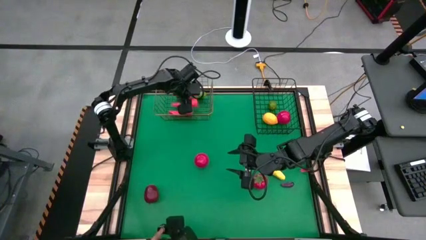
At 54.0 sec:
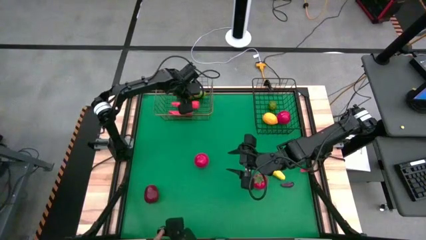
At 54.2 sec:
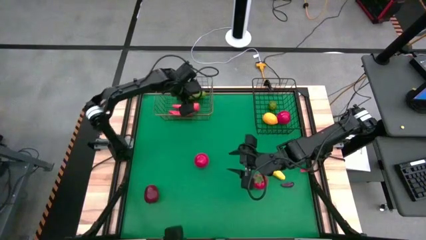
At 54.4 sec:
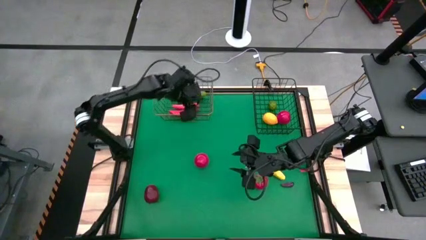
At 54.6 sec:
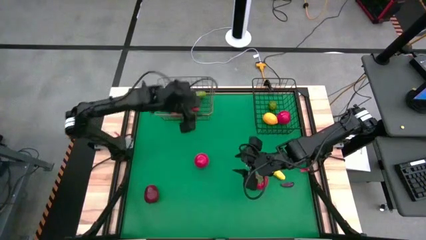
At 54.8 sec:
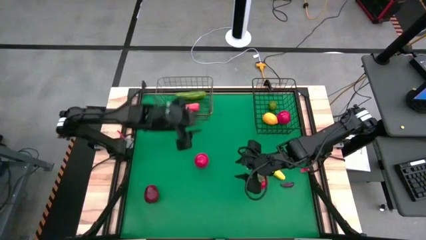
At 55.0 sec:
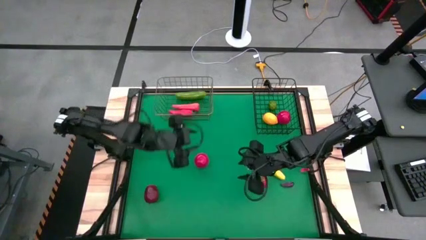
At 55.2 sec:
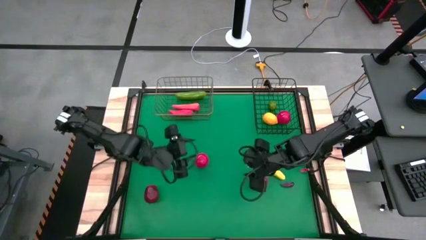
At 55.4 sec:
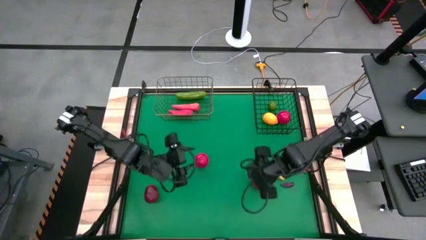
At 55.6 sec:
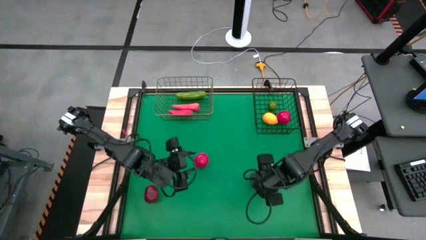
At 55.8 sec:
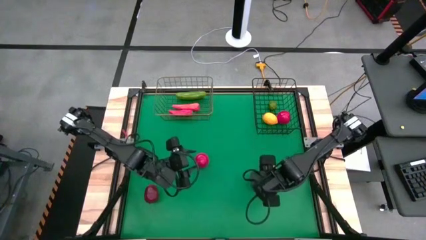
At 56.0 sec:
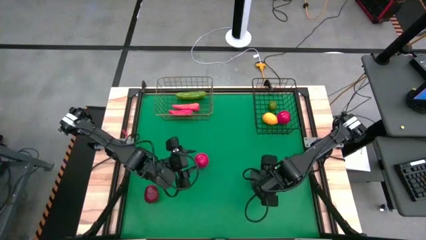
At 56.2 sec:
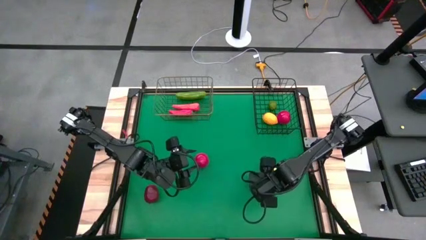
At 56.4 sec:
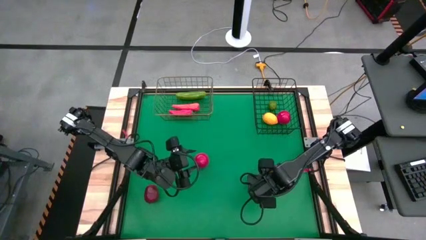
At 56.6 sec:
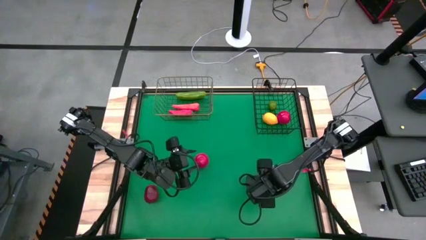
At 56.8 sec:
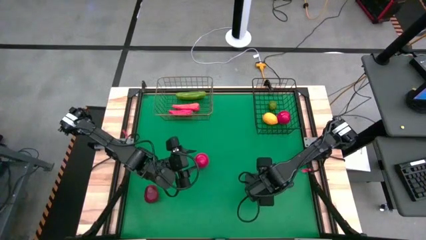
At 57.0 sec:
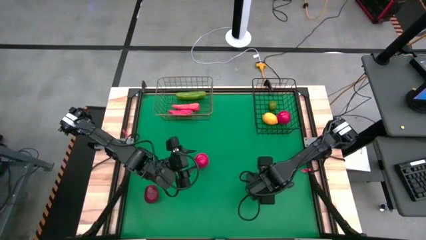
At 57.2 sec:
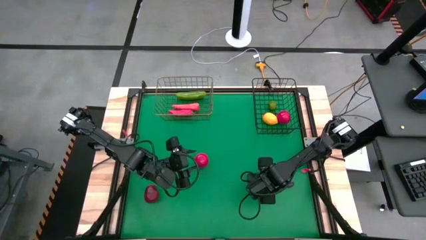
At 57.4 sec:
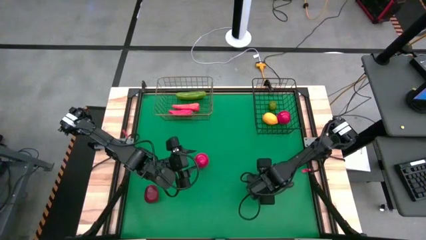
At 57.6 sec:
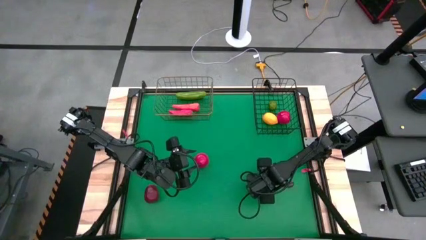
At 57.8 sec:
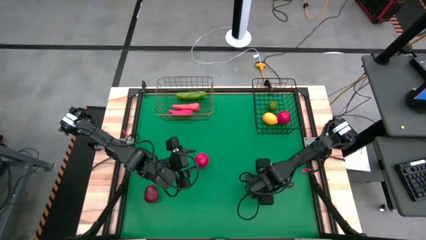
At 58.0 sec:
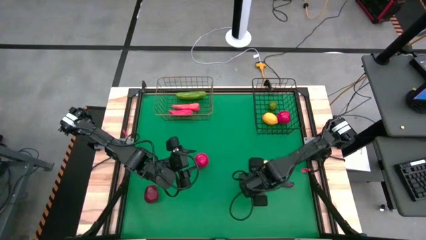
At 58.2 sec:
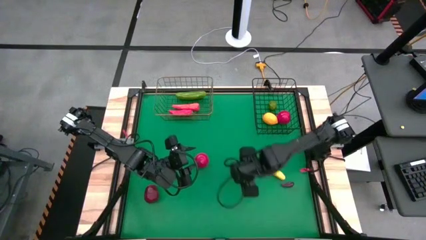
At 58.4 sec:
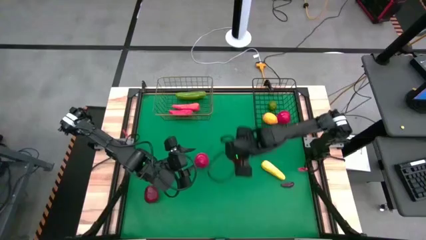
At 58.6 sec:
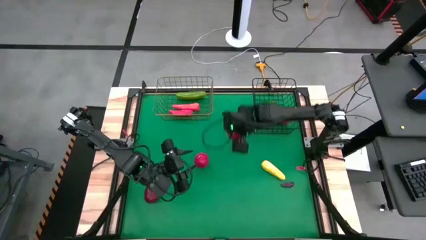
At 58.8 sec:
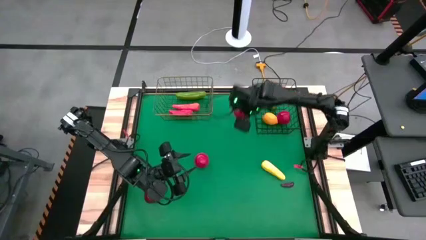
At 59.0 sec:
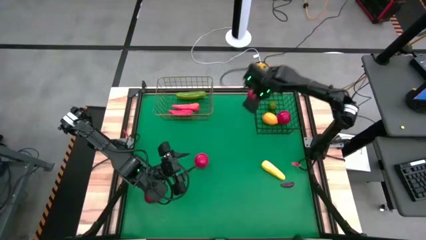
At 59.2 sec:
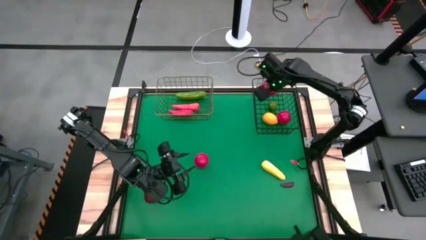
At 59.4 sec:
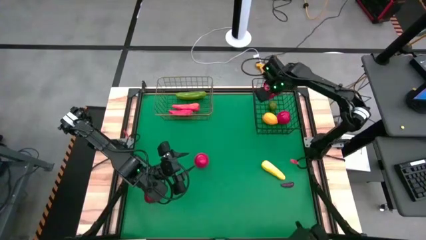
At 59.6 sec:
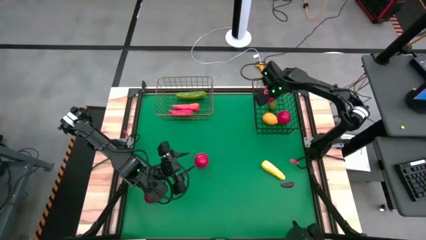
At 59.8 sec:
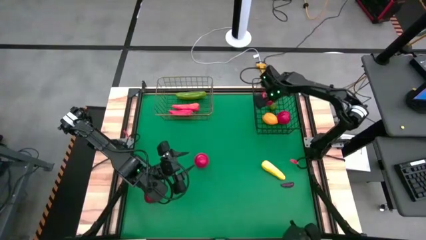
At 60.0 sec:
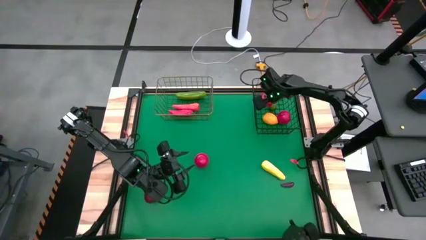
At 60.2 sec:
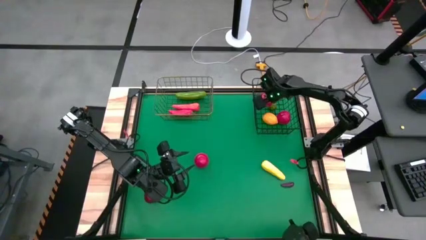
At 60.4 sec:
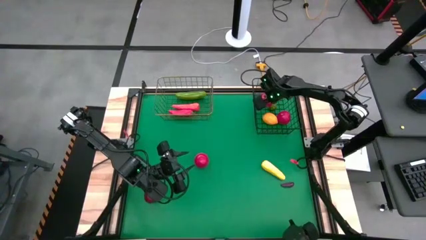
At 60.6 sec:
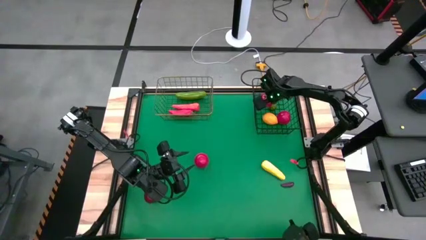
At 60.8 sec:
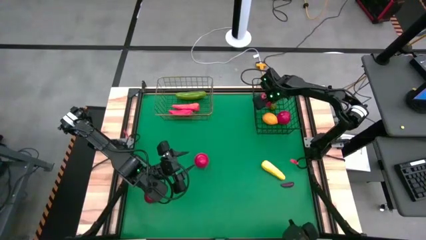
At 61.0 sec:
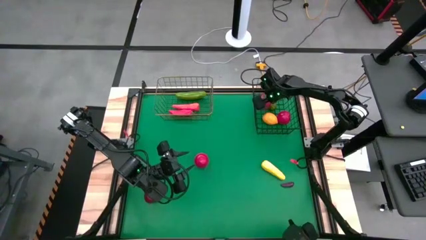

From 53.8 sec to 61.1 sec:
Task: Sort produce into baskets
Put the tomato into the black wire basket

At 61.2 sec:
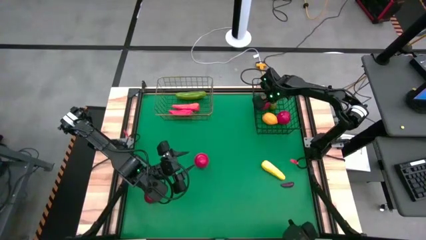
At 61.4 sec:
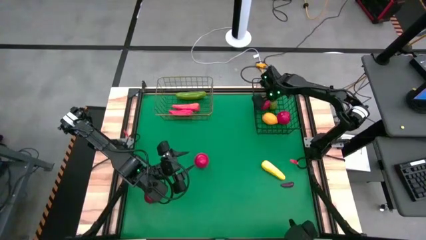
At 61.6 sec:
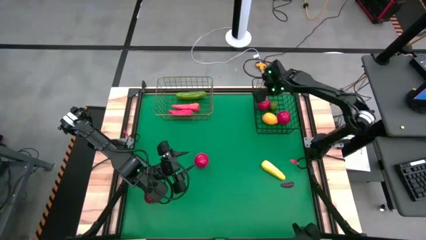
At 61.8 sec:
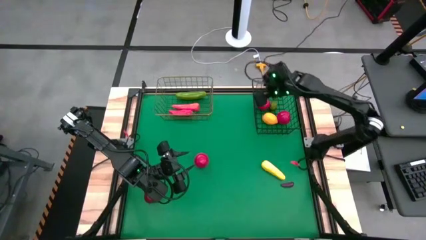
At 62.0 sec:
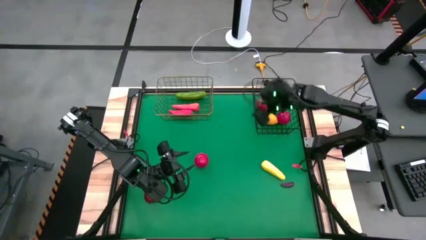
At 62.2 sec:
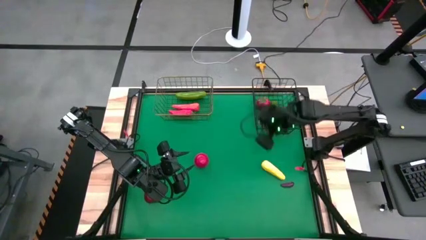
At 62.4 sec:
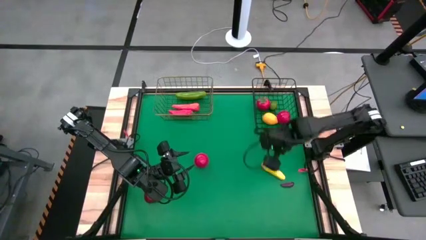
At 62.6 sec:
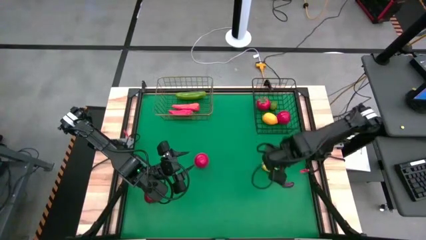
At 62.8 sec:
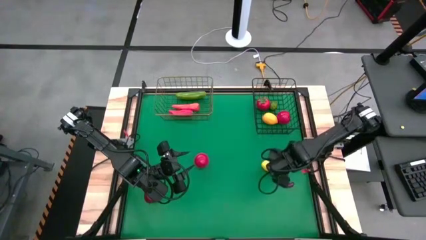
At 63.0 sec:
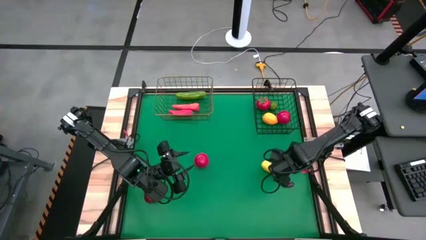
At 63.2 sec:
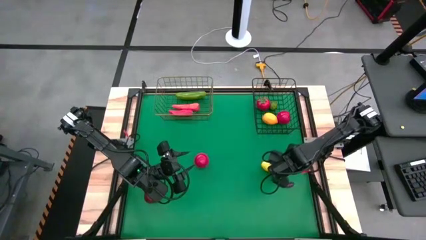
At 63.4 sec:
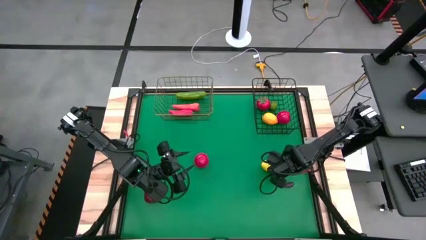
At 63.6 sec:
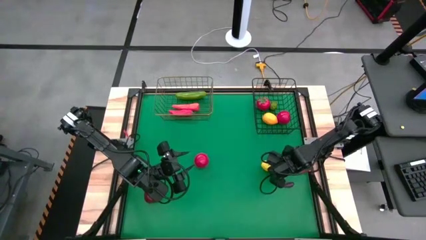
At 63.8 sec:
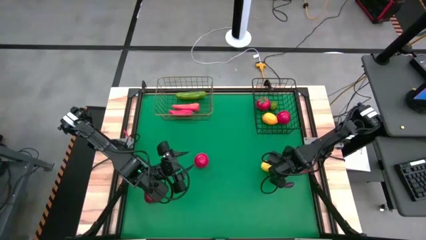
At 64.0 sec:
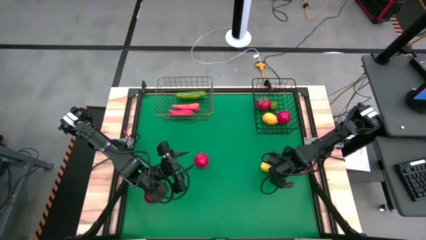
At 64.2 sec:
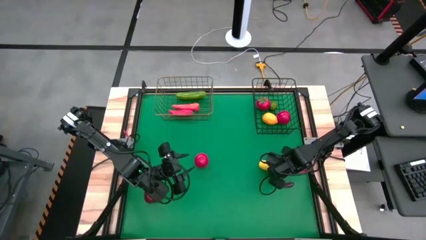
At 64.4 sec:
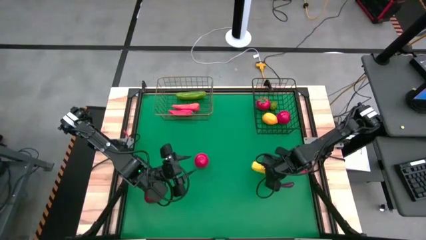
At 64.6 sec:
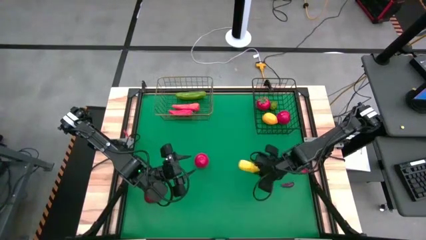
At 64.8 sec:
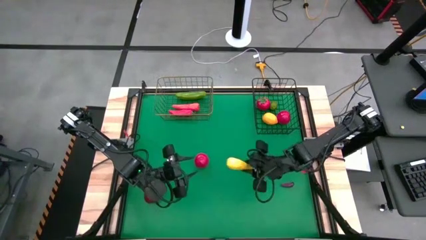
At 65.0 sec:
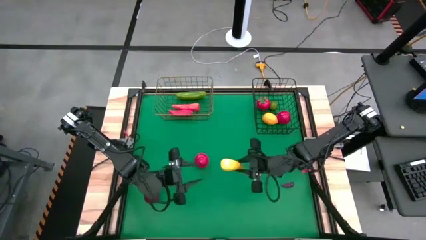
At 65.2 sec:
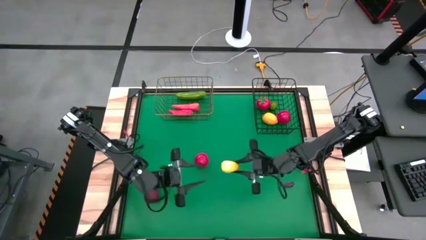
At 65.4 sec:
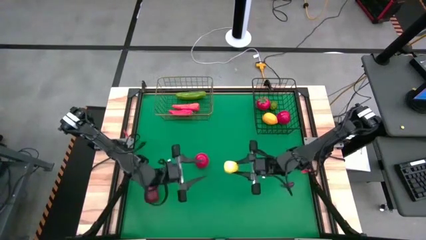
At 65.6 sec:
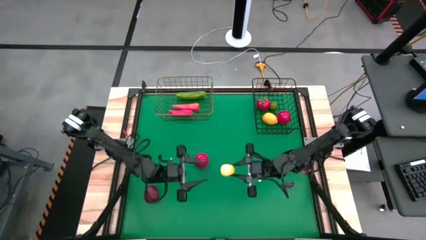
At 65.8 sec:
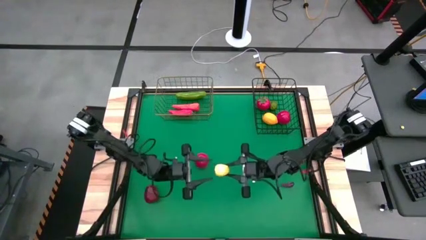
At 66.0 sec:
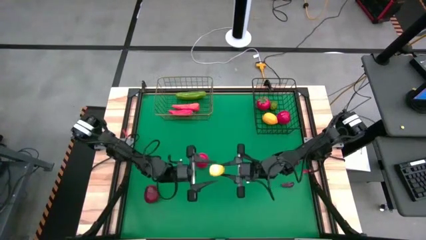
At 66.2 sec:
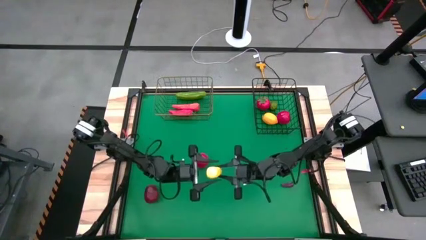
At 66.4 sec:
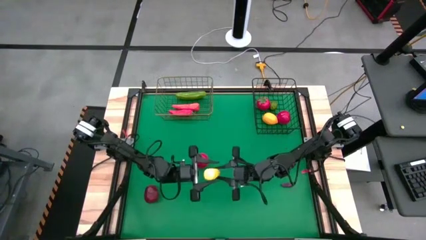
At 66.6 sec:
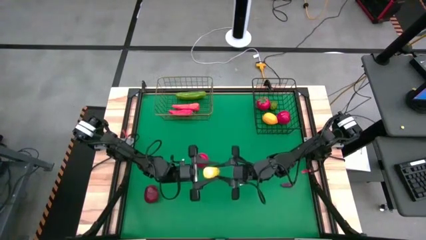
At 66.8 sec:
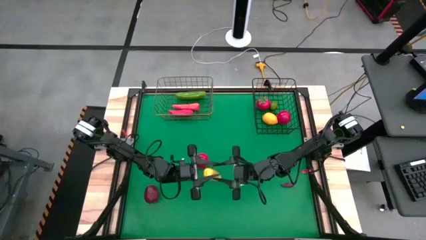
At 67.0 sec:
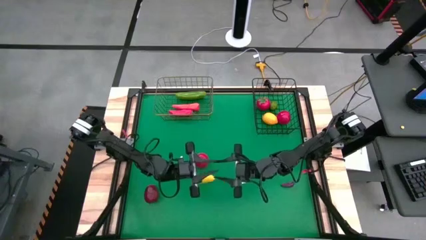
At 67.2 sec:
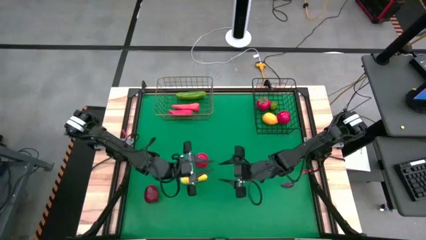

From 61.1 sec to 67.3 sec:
Put the yellow corn into the gold wire basket

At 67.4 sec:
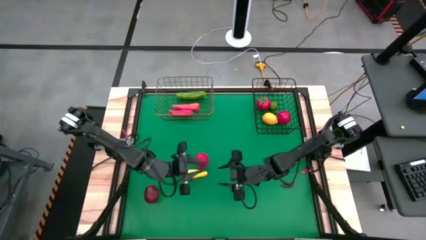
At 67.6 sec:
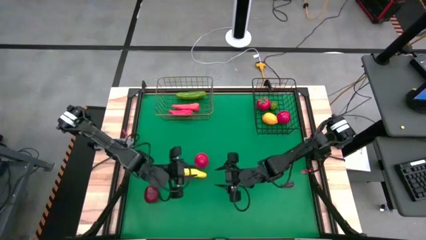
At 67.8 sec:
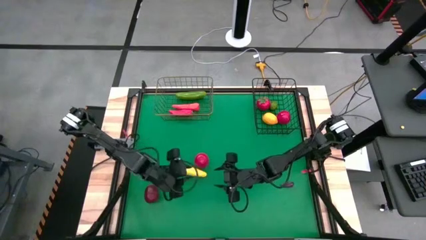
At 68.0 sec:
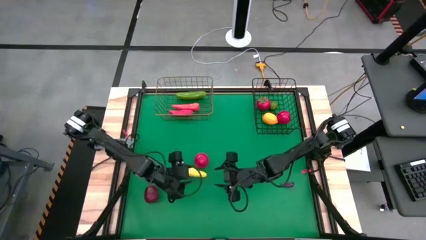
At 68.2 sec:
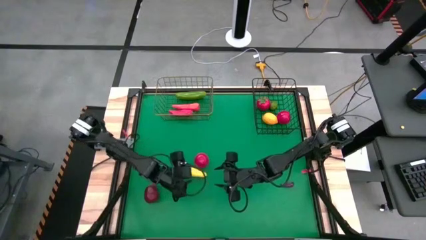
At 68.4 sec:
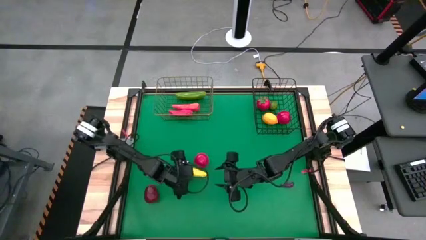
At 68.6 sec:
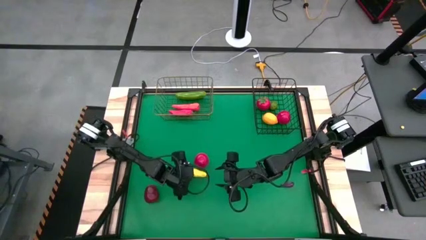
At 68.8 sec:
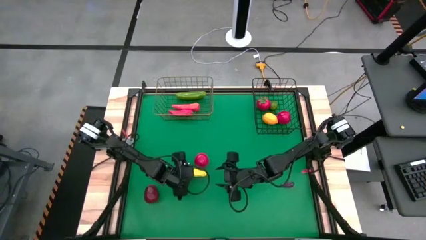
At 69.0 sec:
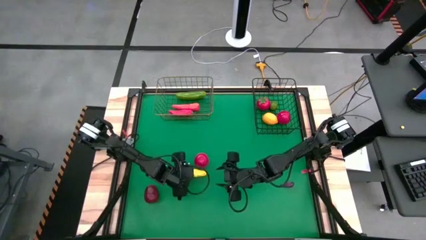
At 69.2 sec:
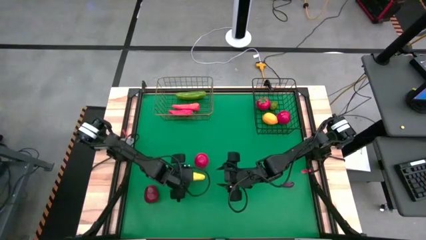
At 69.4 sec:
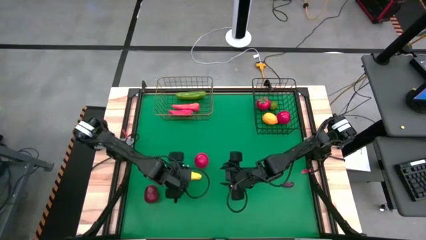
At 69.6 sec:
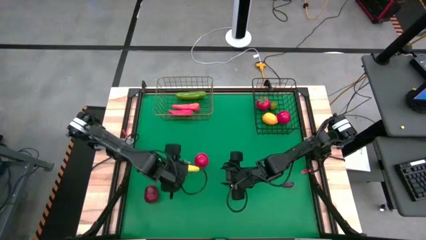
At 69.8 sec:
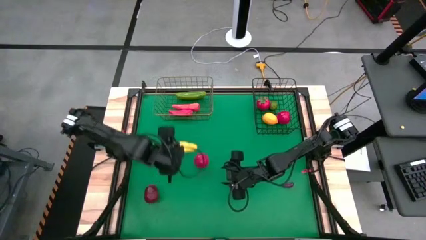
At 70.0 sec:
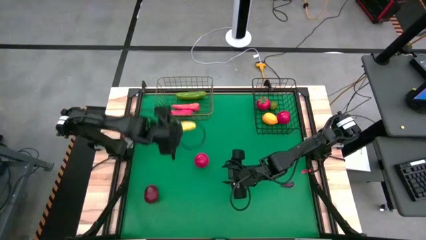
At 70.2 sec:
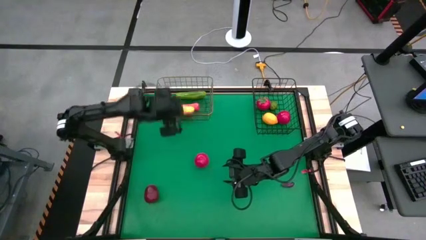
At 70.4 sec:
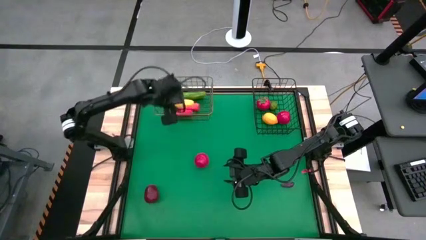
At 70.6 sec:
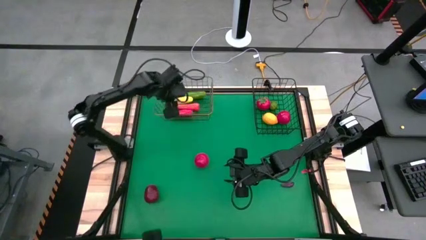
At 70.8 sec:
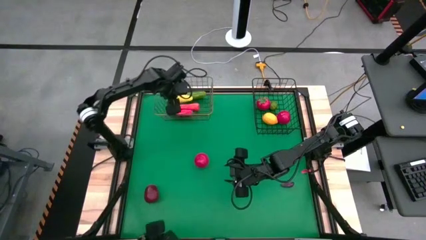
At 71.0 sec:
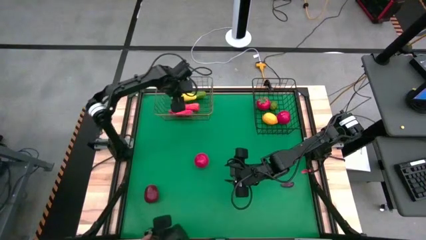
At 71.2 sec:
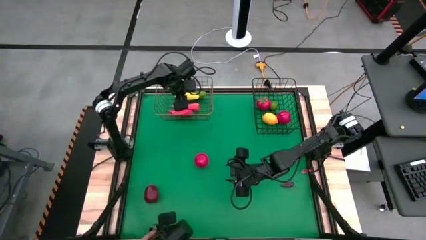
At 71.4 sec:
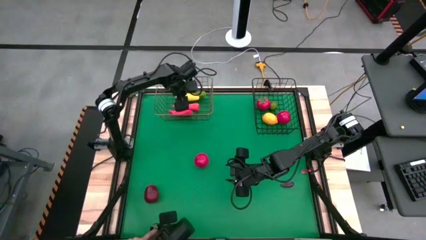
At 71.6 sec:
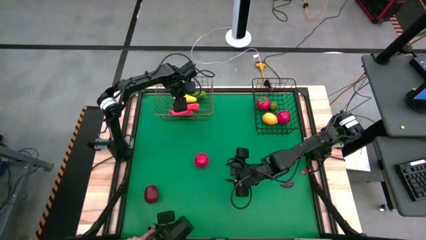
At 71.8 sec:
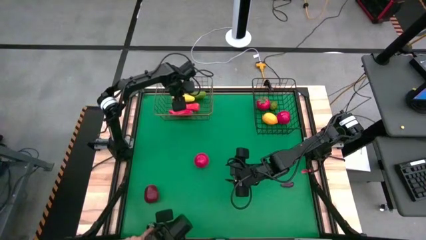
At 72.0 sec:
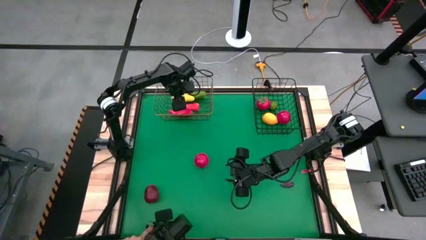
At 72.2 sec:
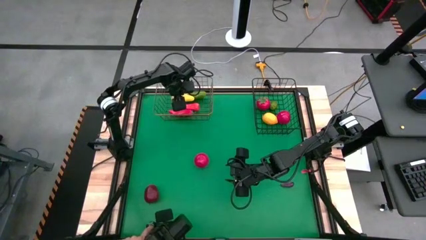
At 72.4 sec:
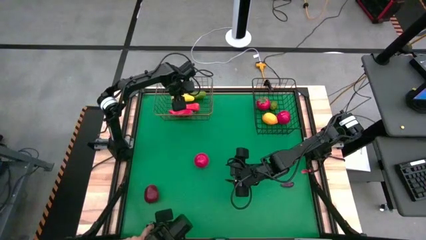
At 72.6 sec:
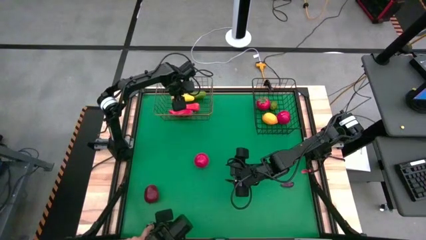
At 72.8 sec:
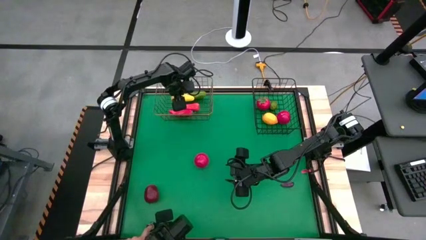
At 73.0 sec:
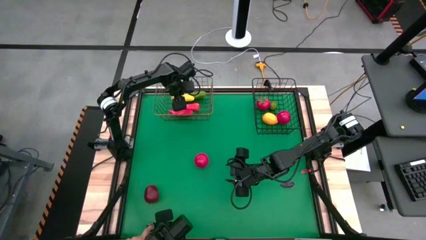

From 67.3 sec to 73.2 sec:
Put the yellow corn into the gold wire basket
